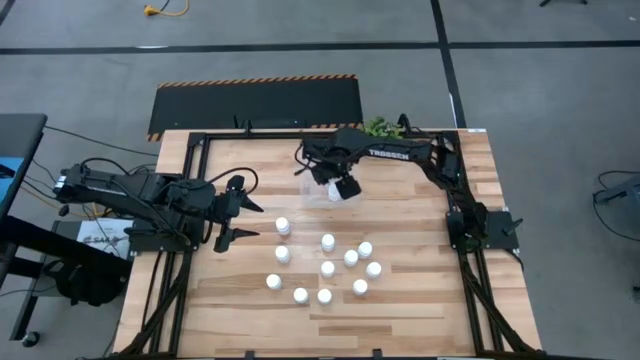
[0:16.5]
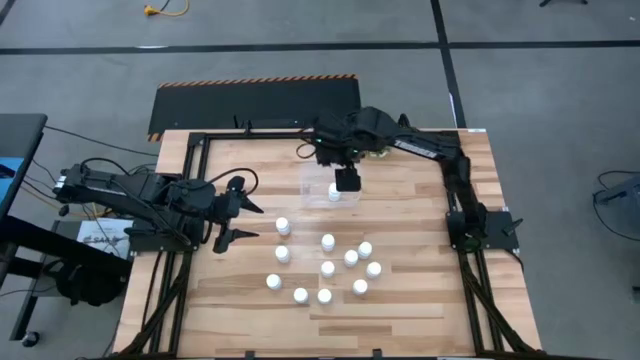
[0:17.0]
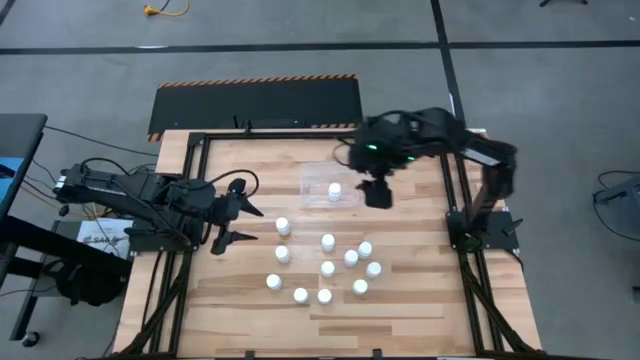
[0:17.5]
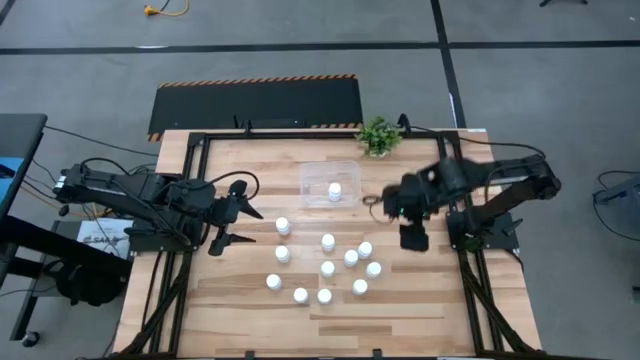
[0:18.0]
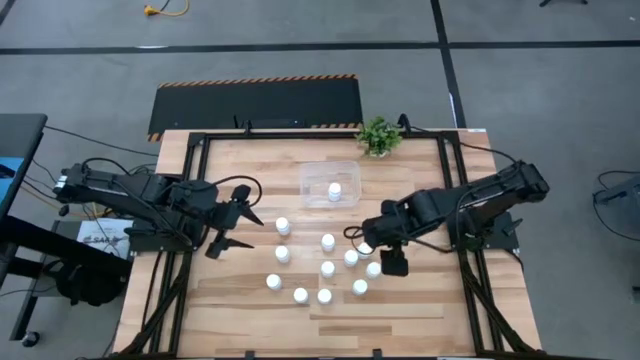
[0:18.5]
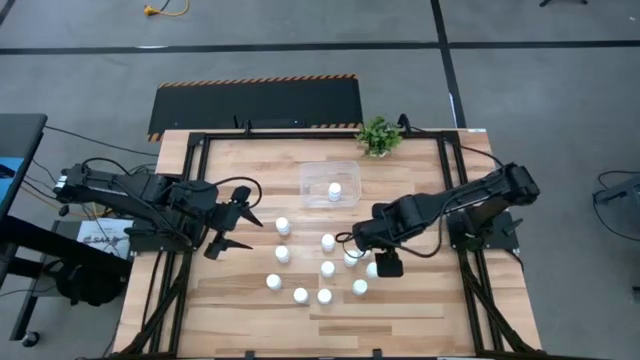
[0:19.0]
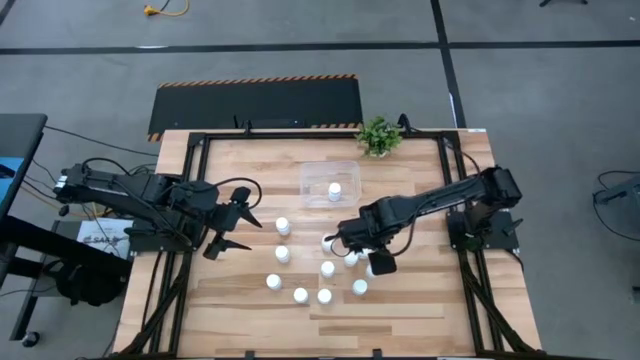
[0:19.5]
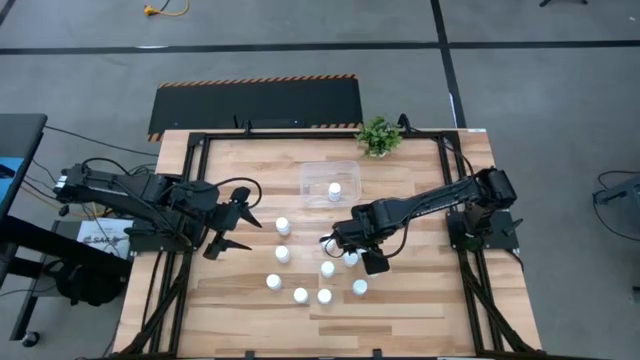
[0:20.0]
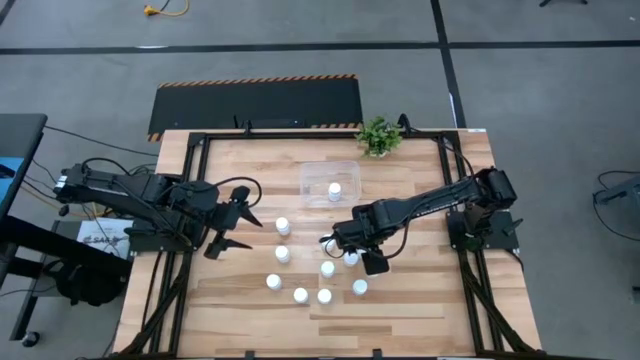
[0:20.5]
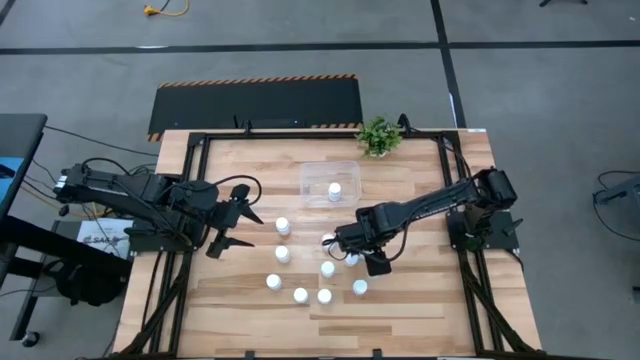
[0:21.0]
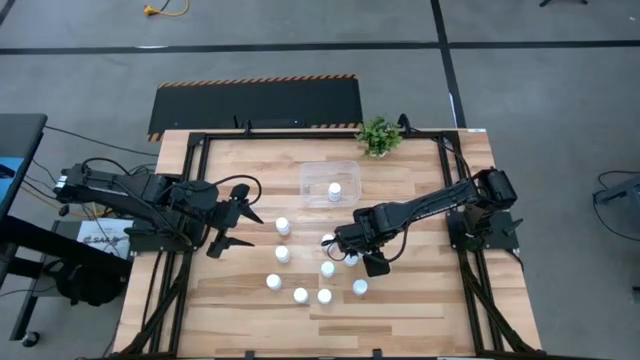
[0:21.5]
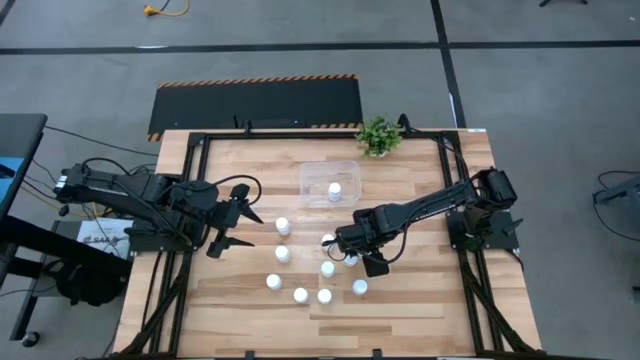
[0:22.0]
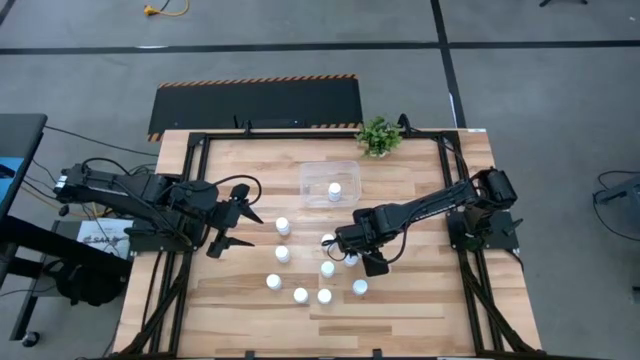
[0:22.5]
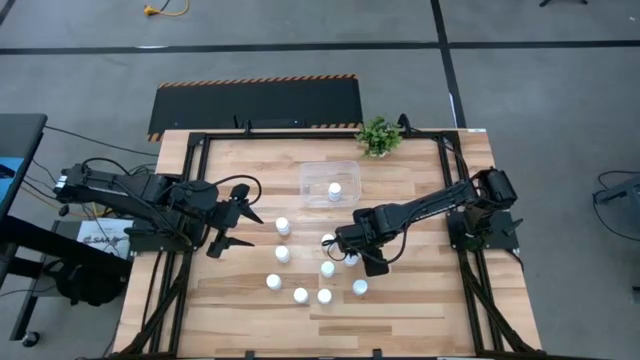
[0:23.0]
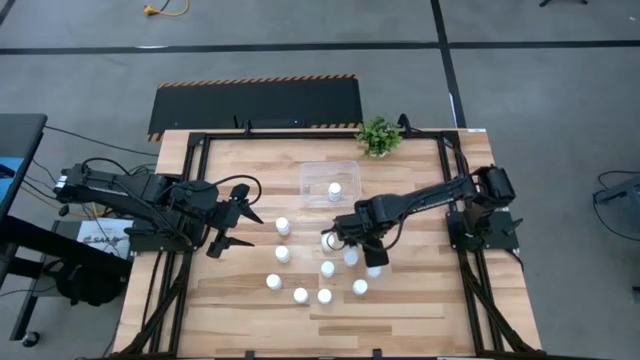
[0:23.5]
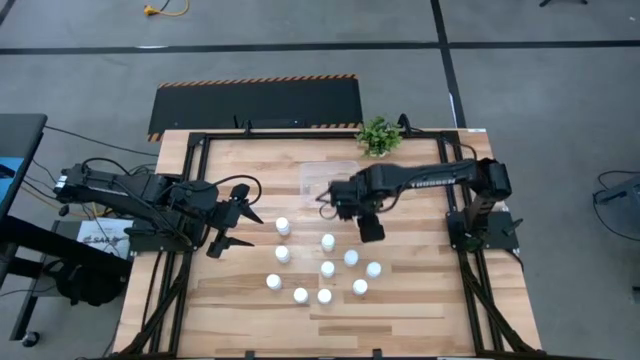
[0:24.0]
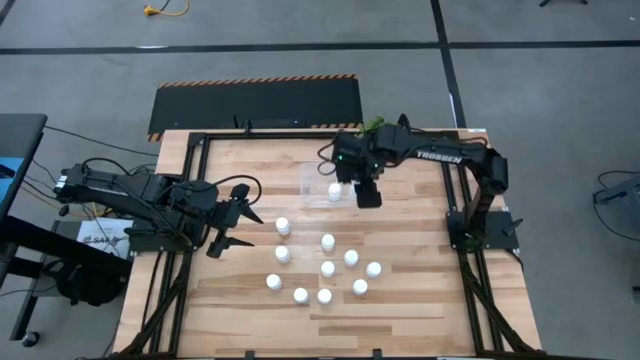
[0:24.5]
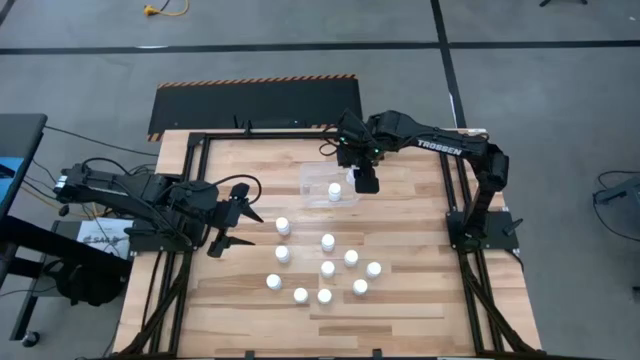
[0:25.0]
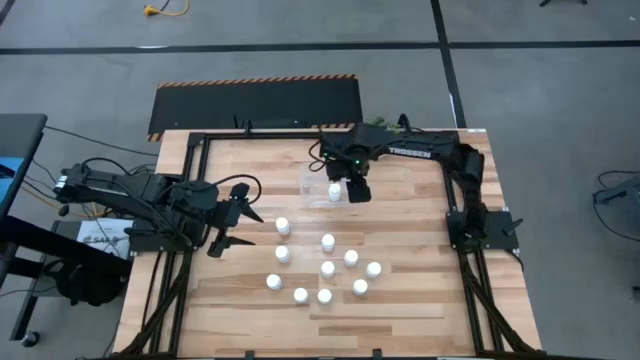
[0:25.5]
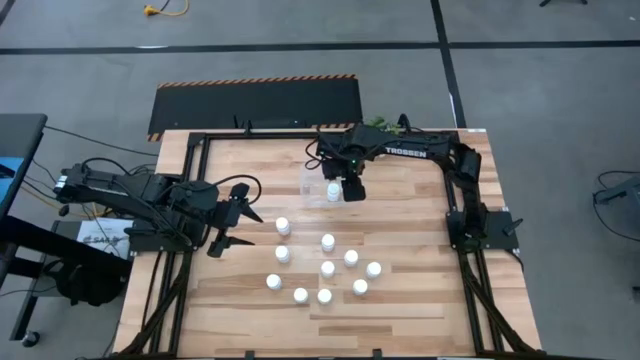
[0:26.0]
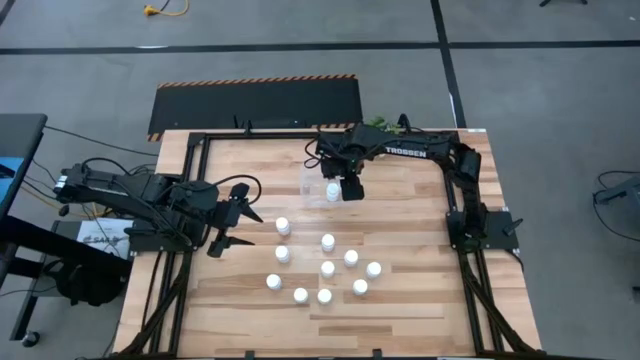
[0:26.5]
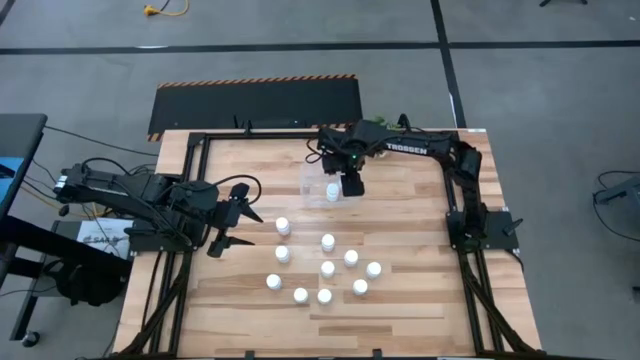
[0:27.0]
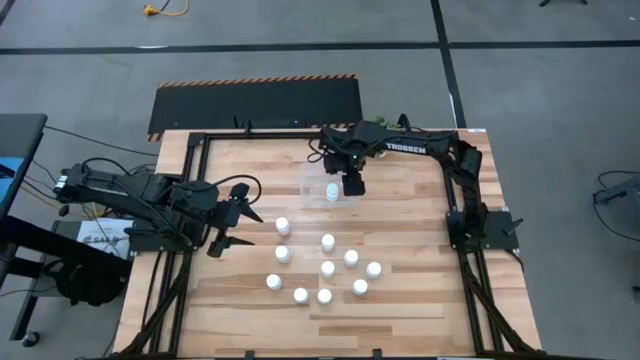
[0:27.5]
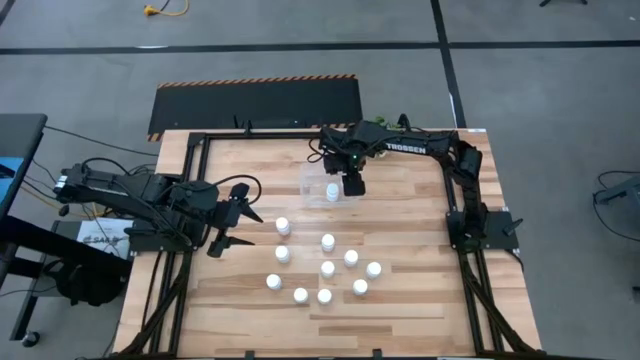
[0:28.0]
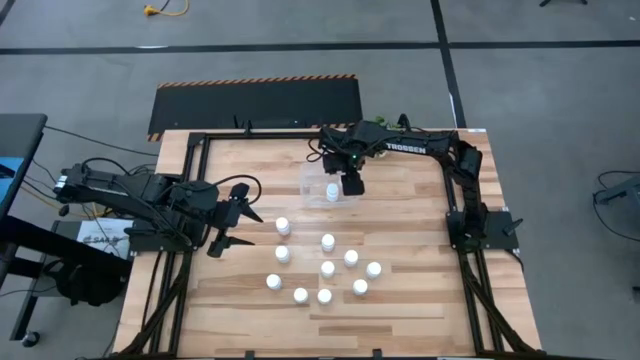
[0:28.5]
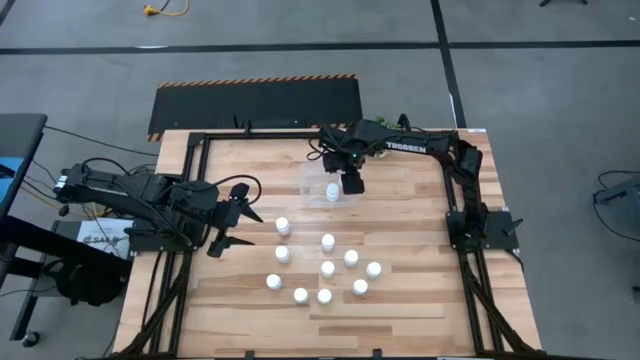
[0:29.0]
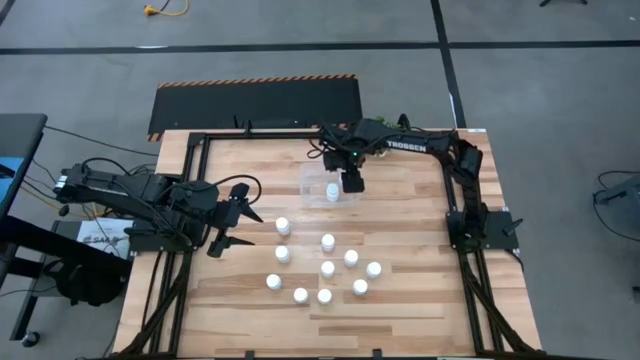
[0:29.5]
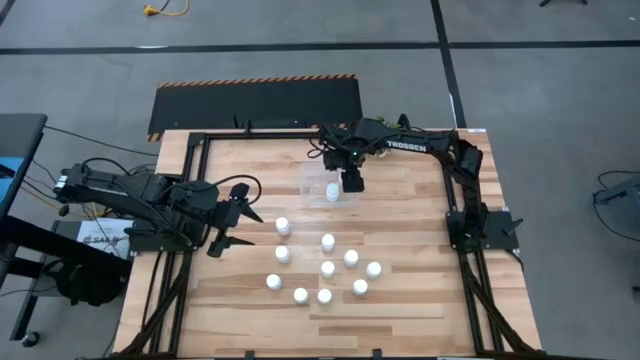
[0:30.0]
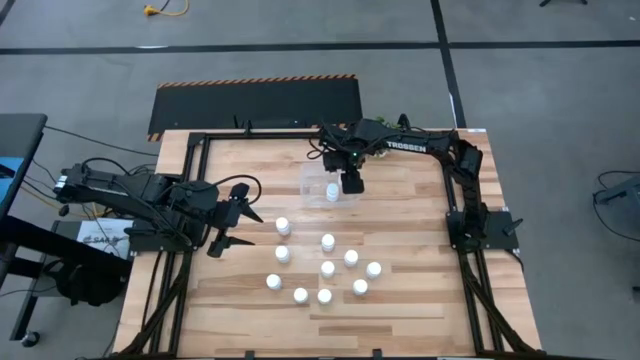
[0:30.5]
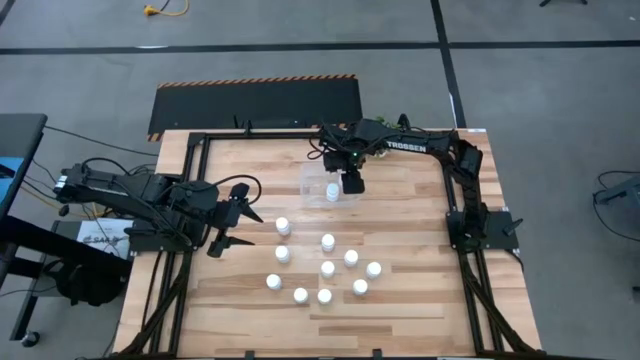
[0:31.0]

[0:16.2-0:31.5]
Task: Pick and place pill bottles into a basket
Put the white medicine bottle into the transparent bin

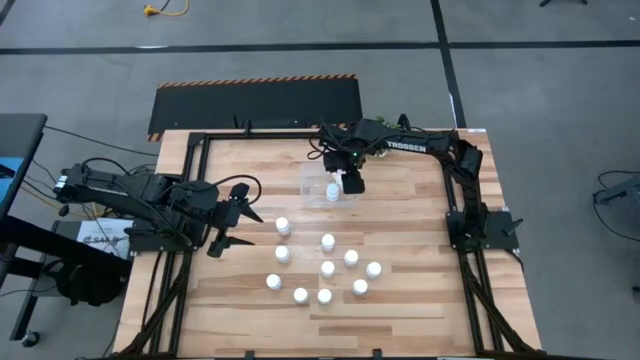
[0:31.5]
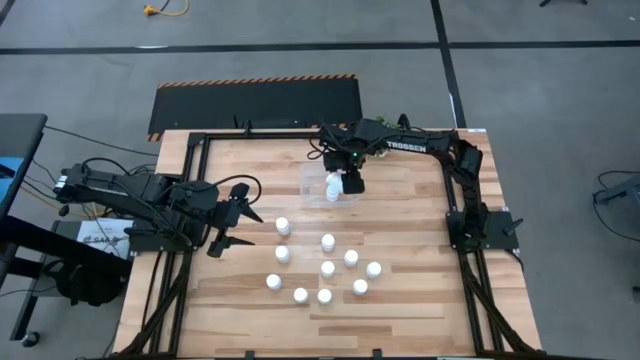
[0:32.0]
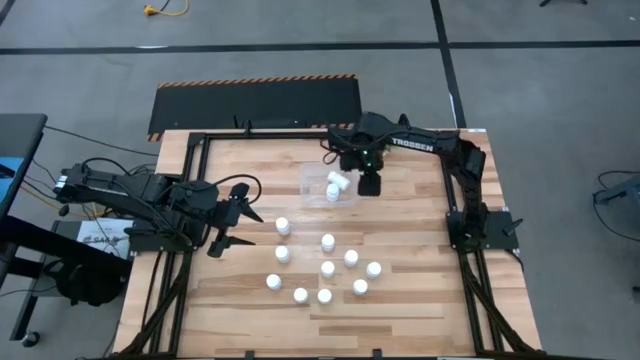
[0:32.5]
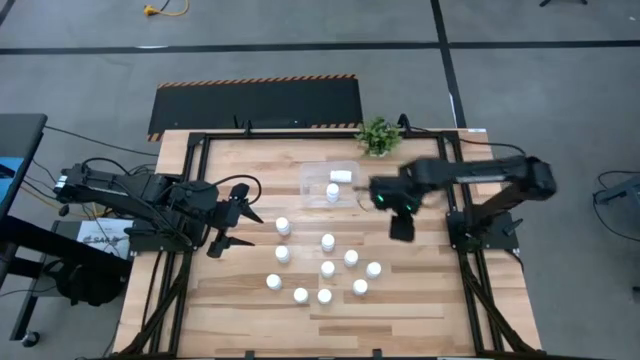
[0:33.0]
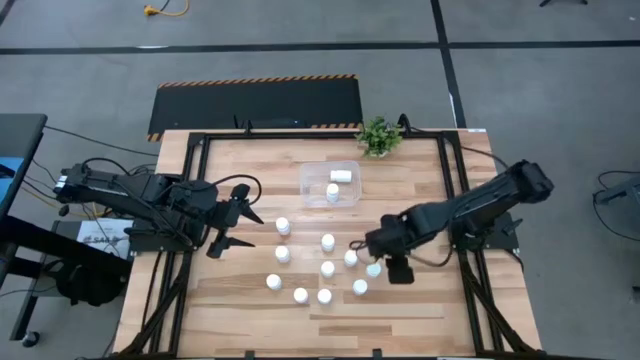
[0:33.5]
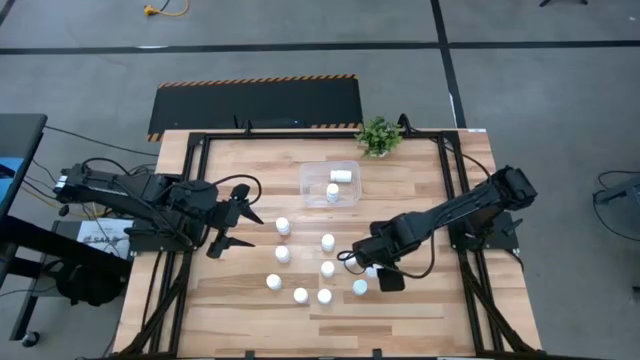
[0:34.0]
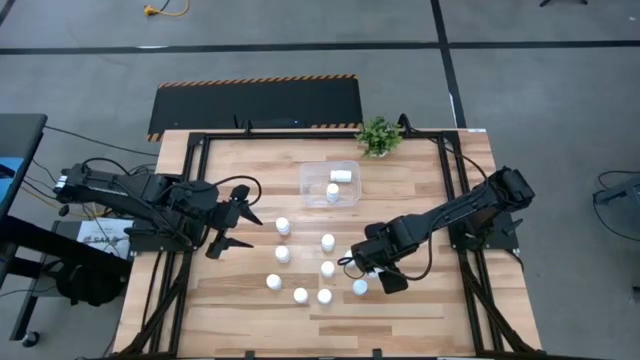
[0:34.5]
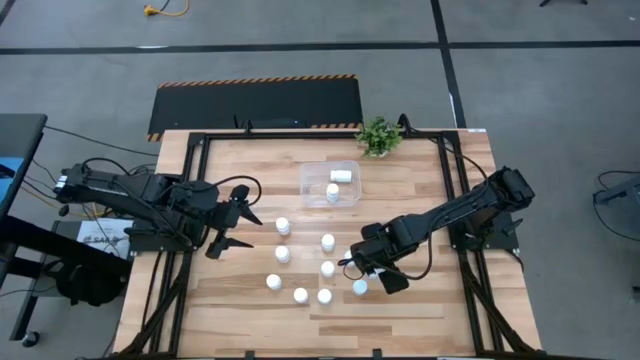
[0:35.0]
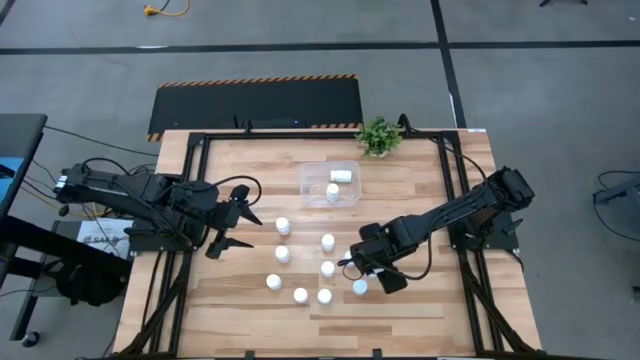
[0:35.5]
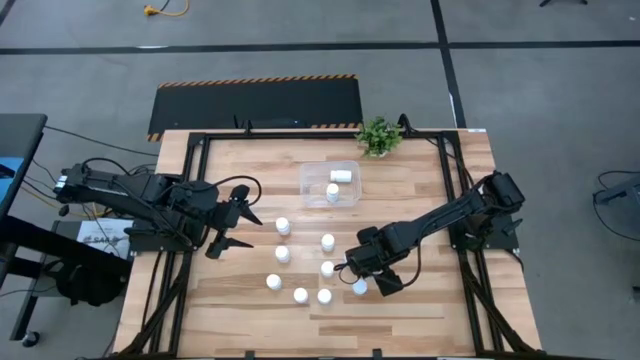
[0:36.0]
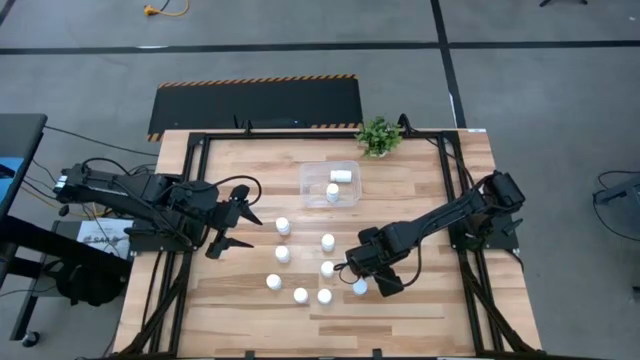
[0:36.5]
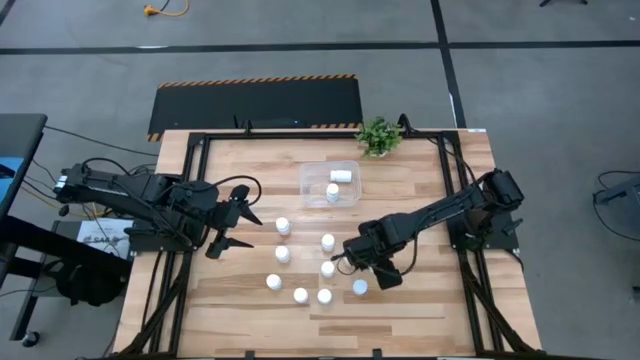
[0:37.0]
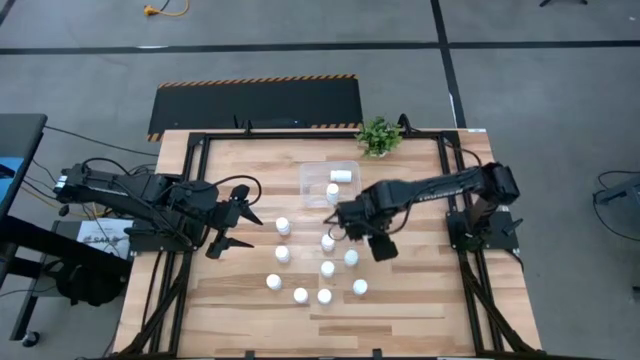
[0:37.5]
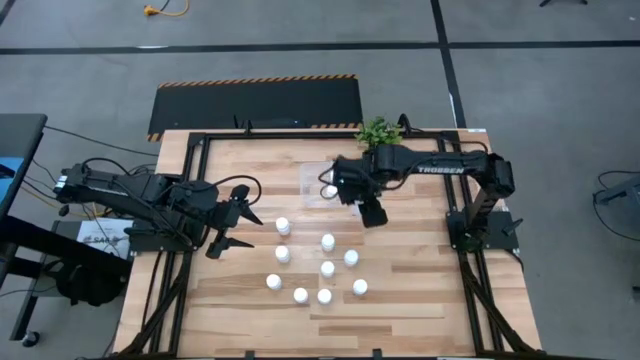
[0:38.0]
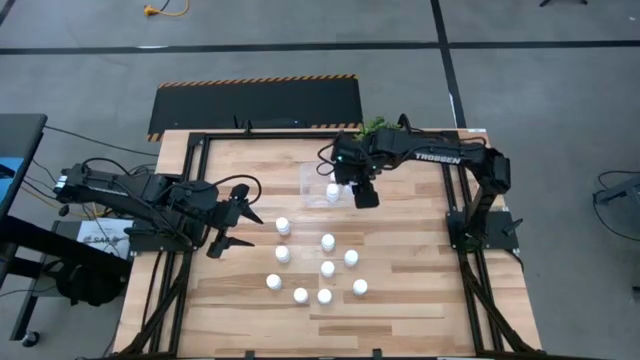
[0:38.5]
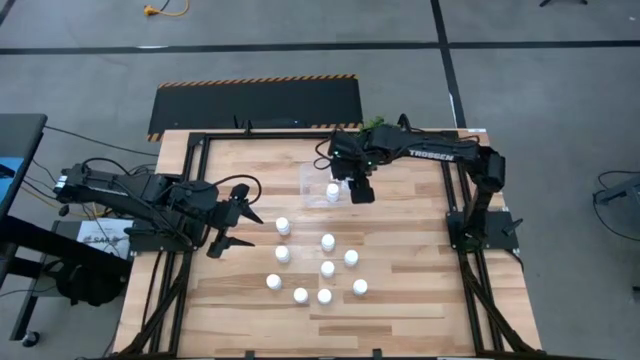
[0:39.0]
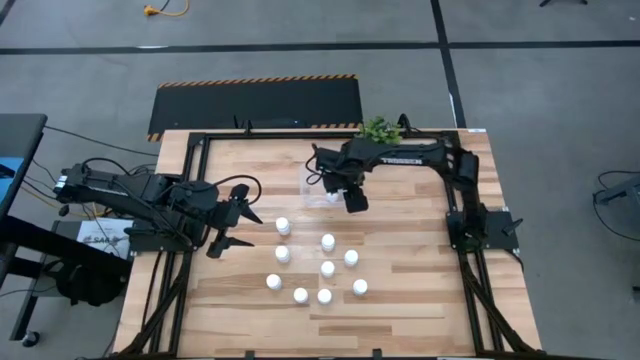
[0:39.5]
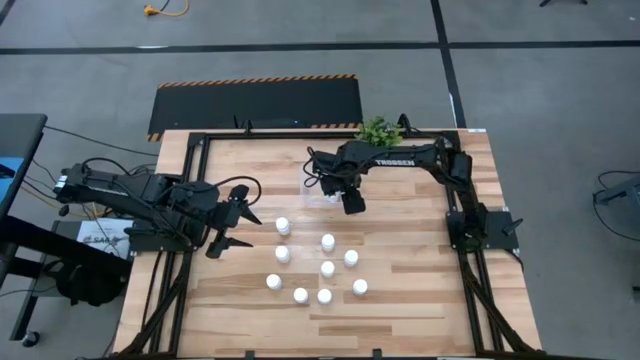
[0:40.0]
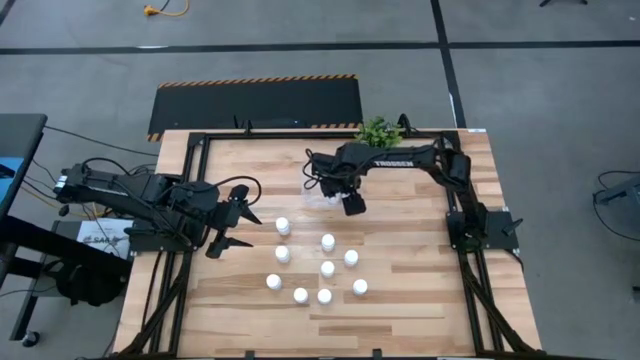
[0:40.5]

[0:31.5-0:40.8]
Put the white medicine bottle into the transparent bin
